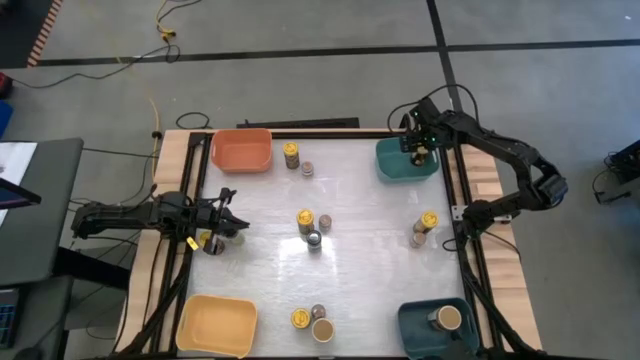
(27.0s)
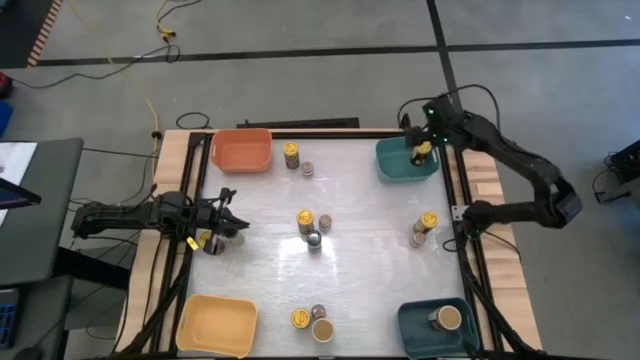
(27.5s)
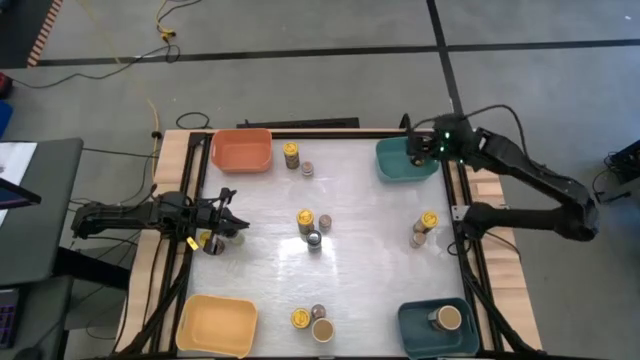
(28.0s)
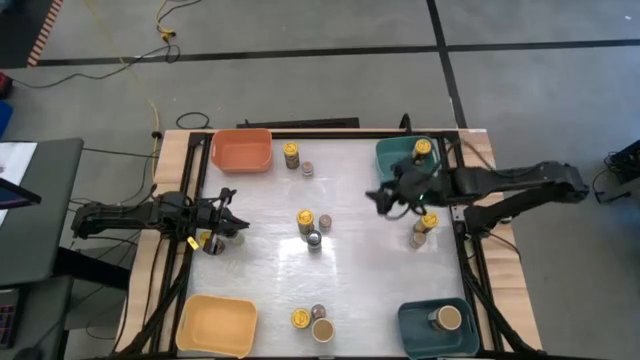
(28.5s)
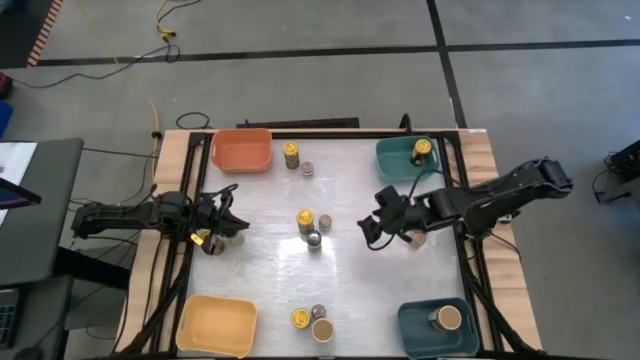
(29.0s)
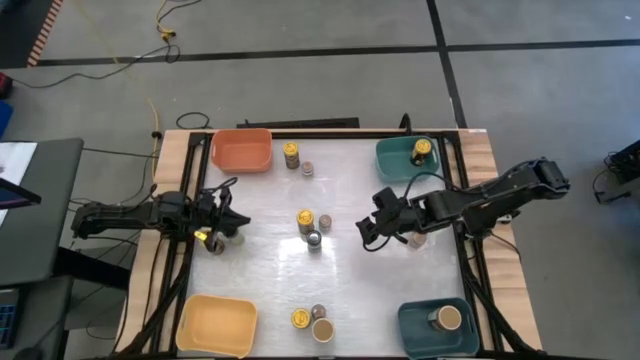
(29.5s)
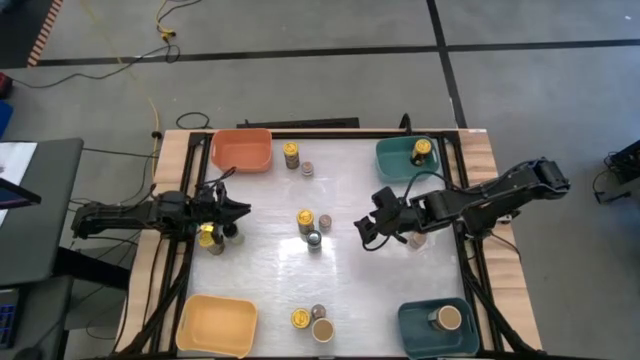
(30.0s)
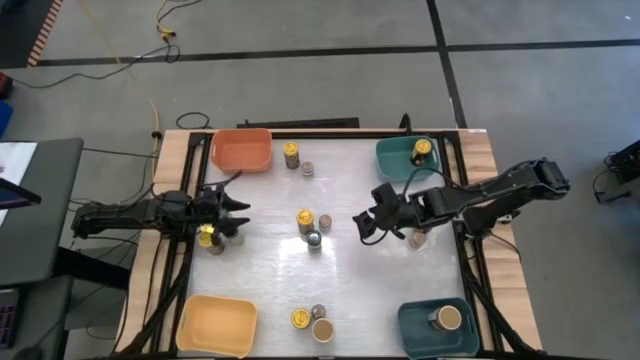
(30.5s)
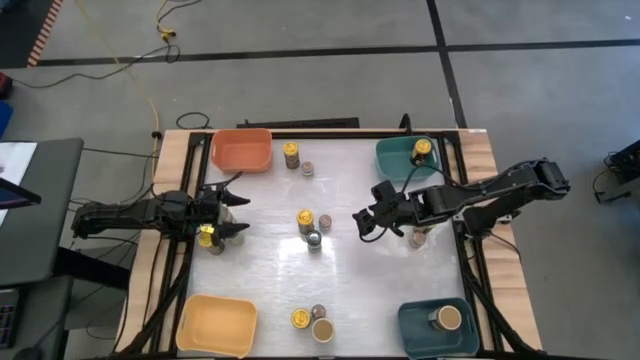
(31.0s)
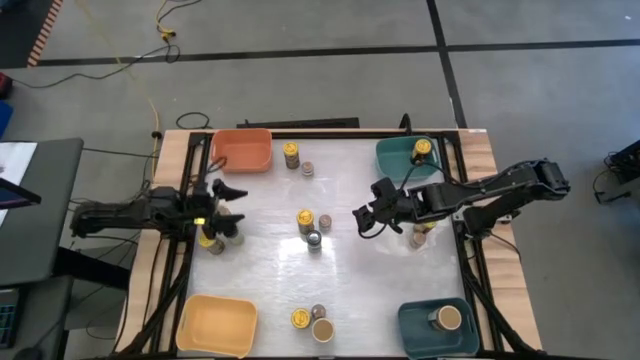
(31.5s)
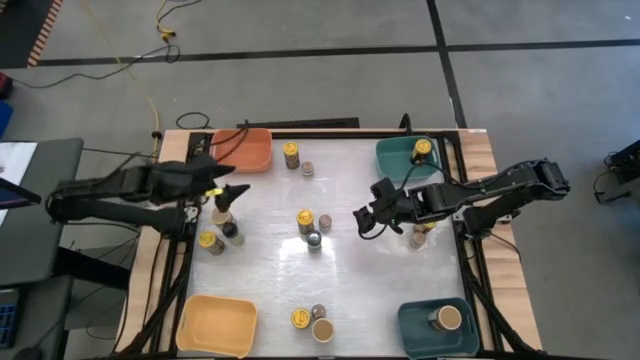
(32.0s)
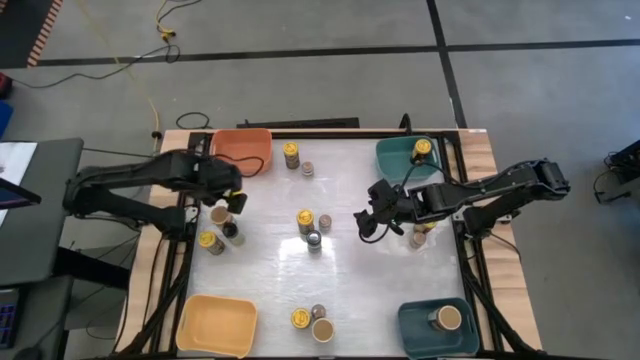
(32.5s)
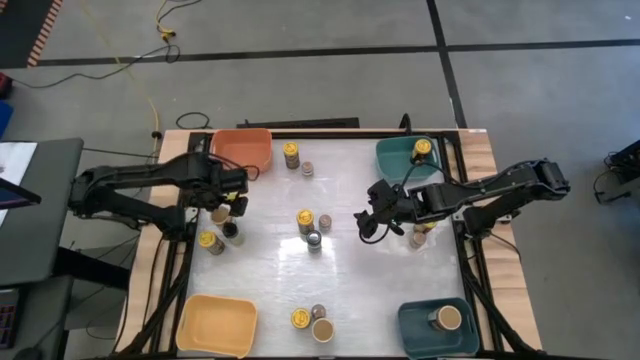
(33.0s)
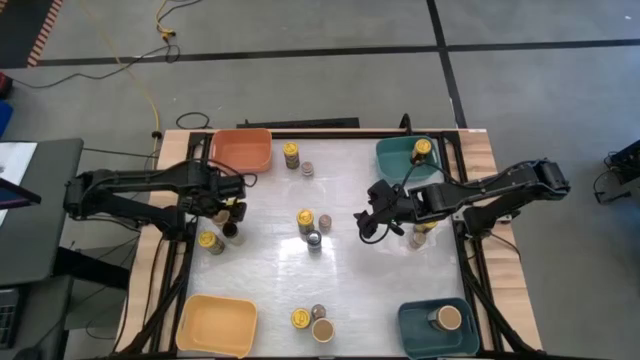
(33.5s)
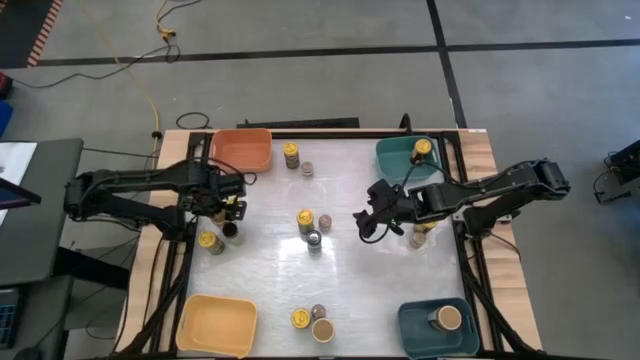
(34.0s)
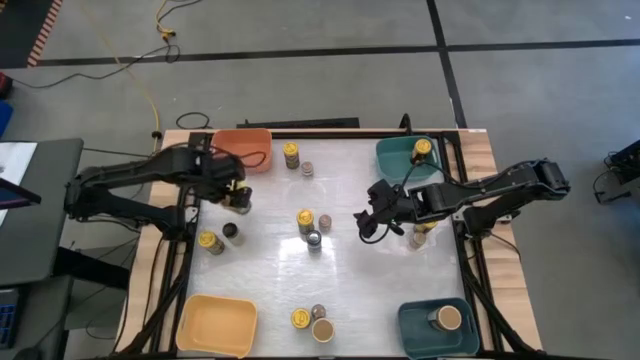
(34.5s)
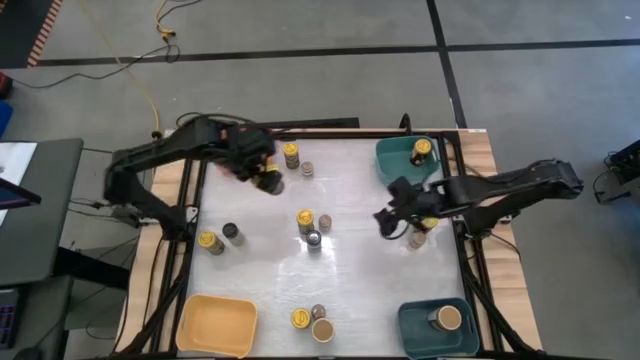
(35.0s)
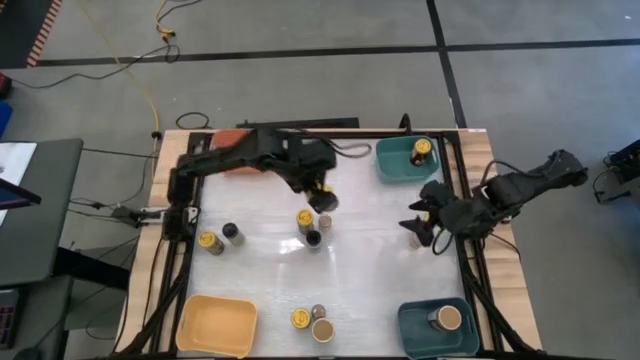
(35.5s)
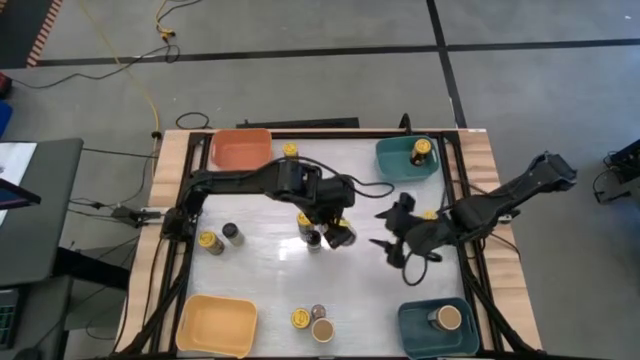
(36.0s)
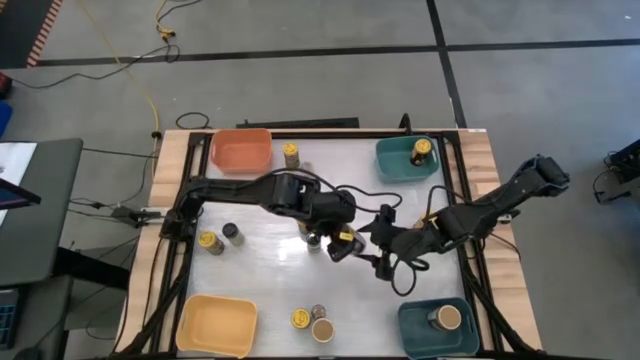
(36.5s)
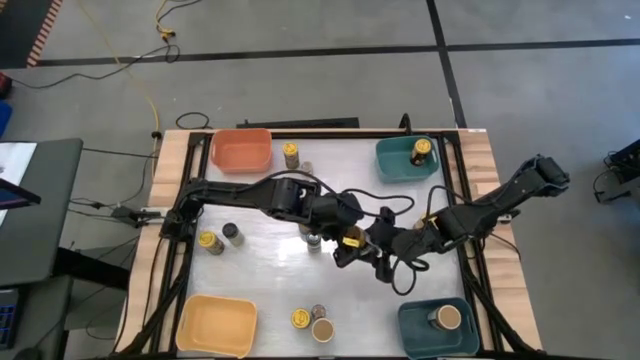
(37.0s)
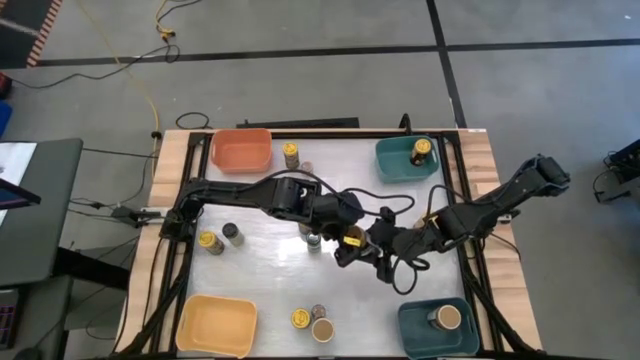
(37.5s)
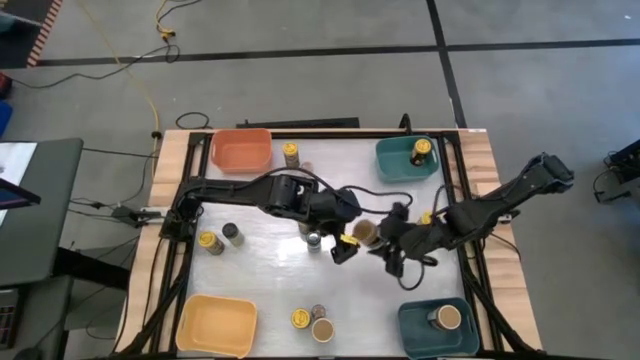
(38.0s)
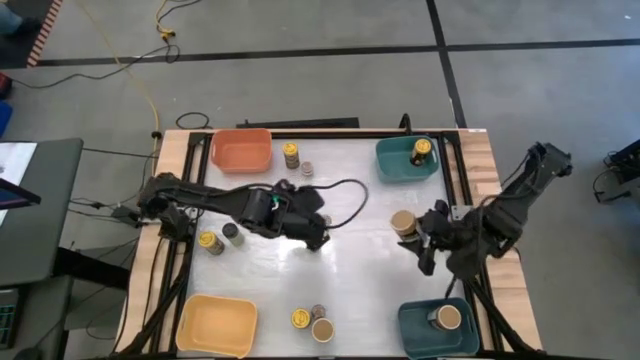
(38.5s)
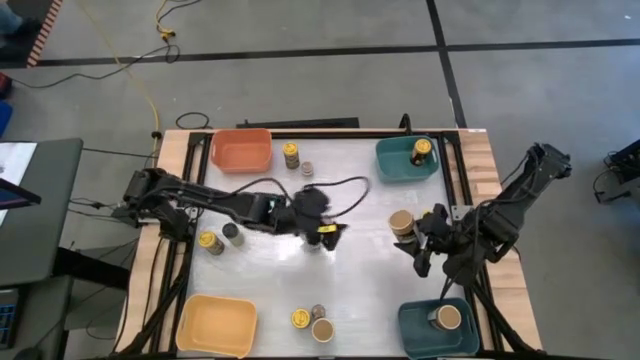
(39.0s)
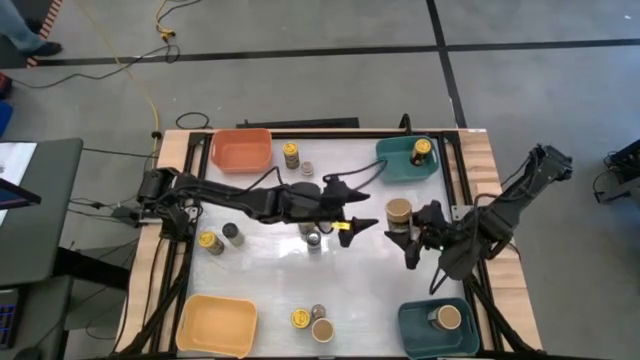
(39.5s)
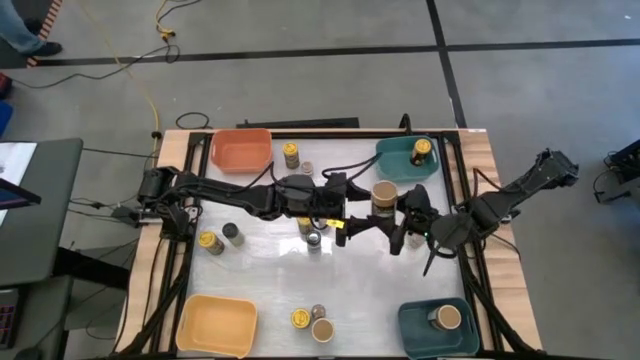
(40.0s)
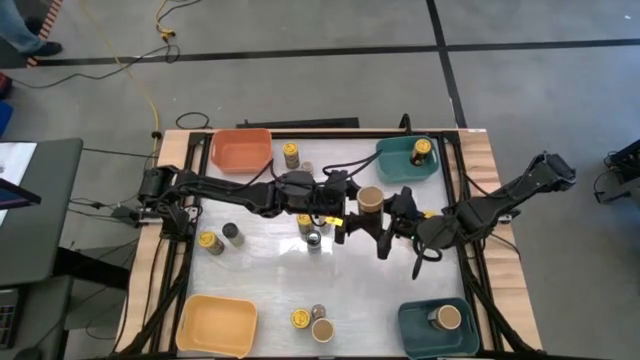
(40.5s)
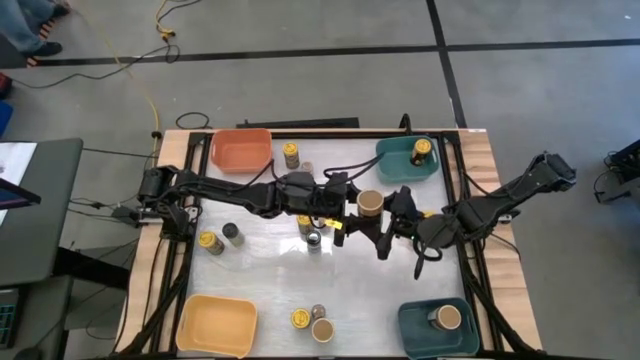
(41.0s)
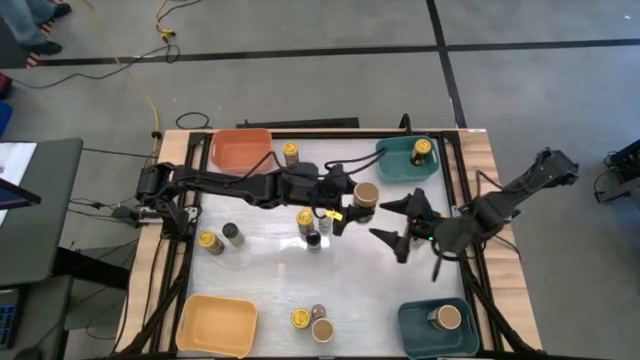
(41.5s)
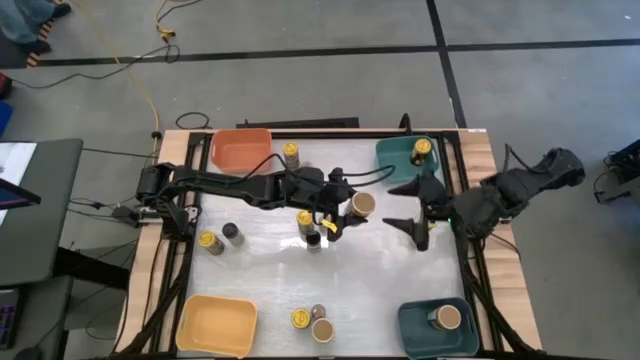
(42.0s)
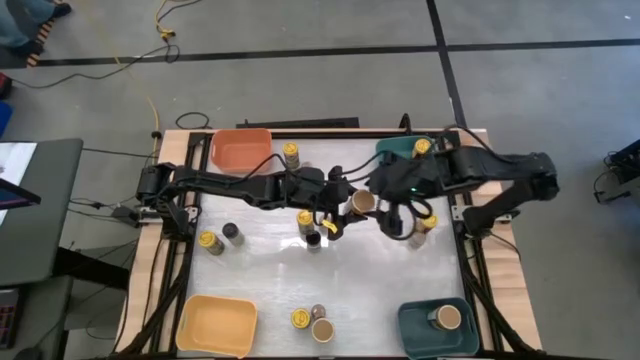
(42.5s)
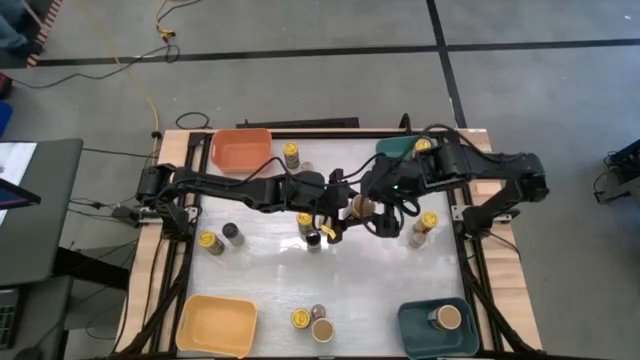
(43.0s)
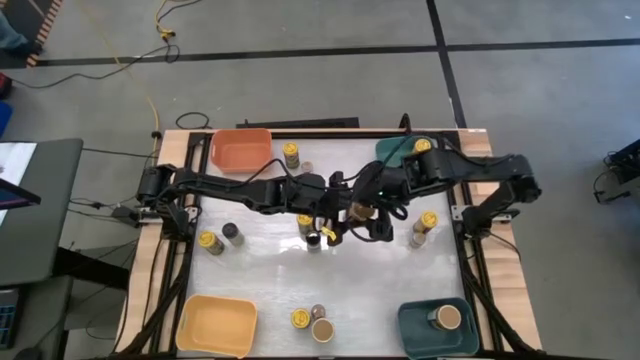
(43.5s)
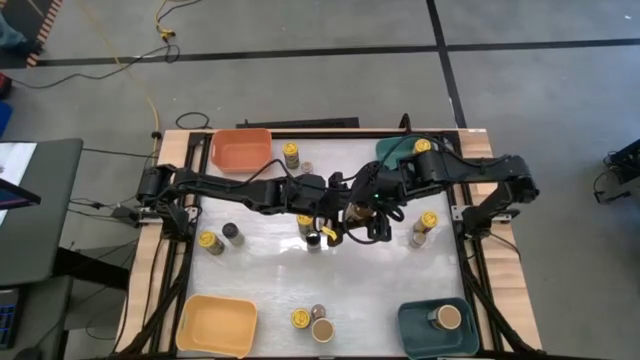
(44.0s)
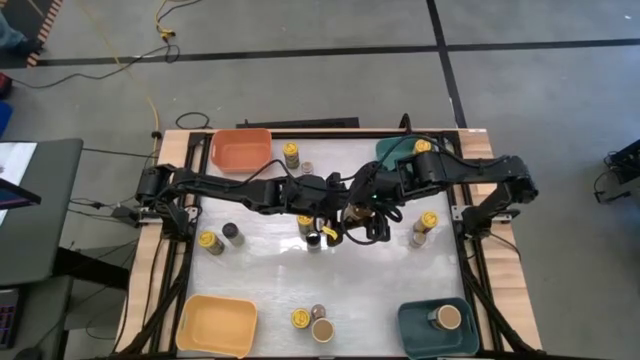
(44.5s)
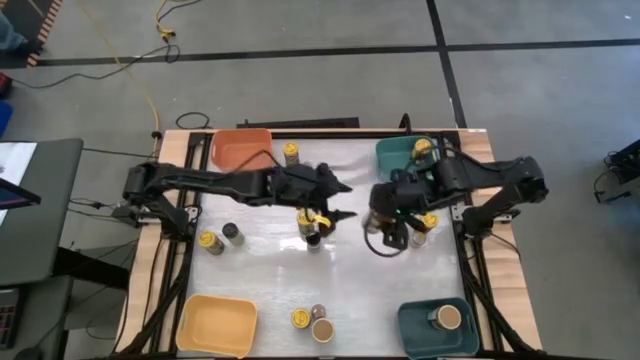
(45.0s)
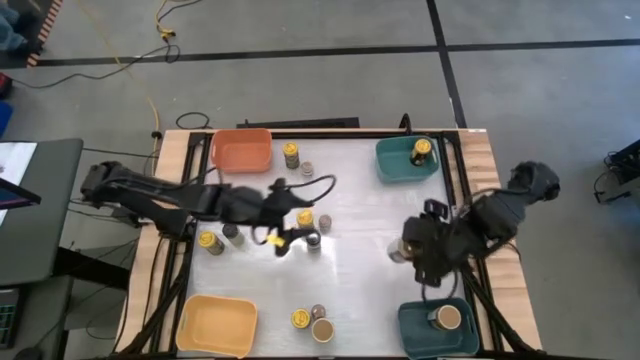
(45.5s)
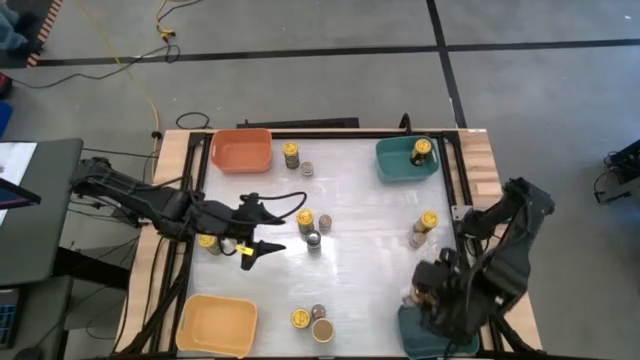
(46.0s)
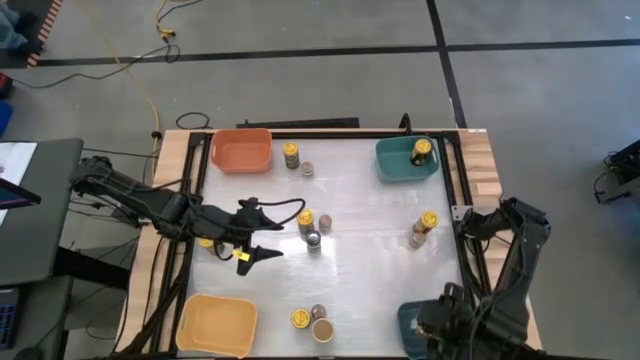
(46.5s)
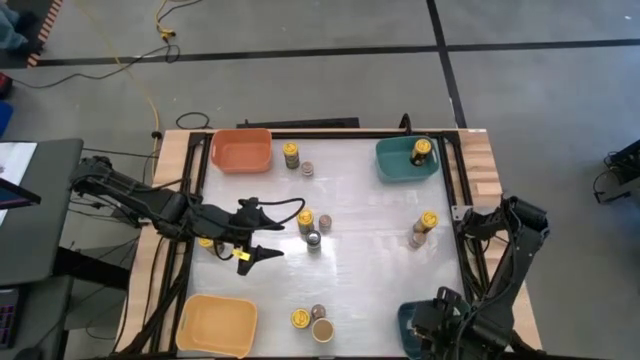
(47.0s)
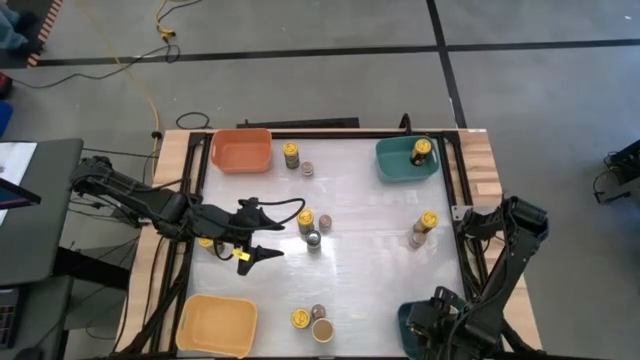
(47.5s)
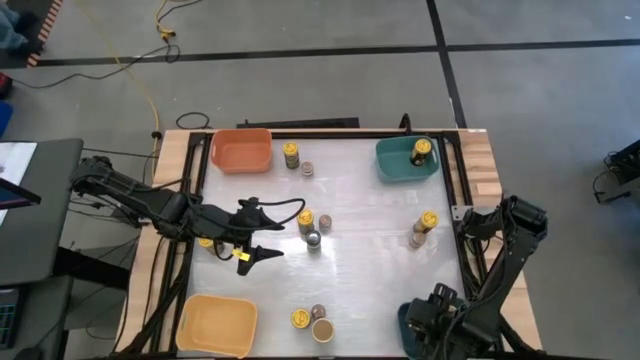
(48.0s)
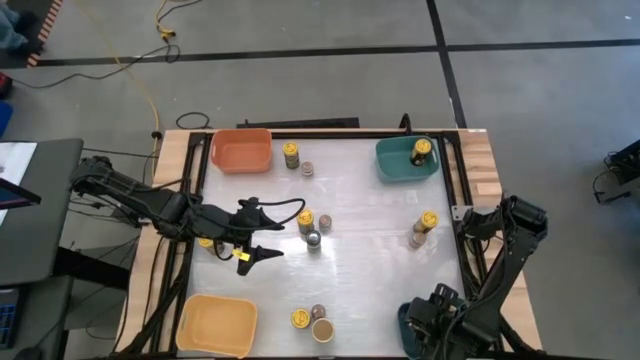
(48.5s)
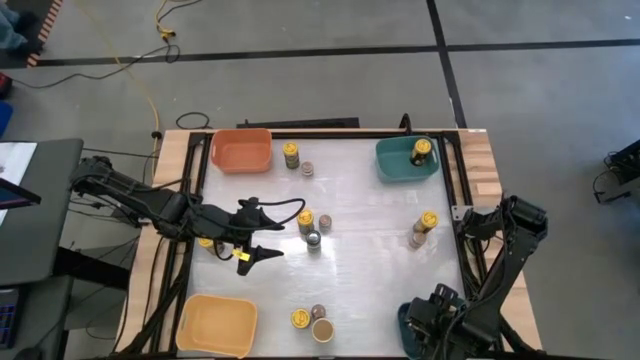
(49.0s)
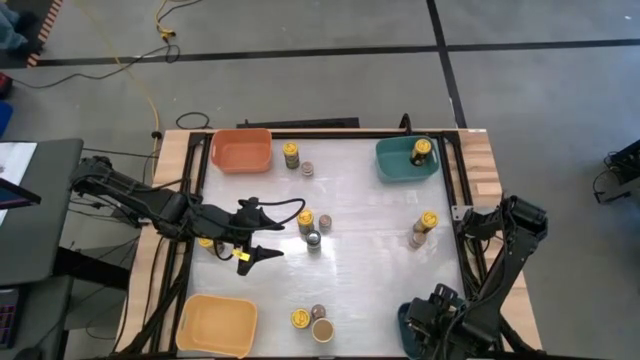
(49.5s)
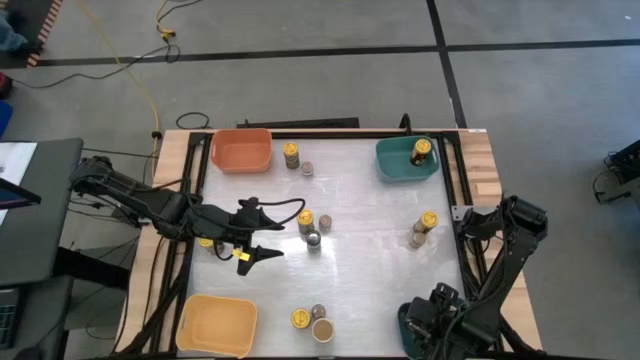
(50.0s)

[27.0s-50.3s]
Task: Sort spices by type
Put the top gold seasoning bottle into the bottom teal dark blue bin
